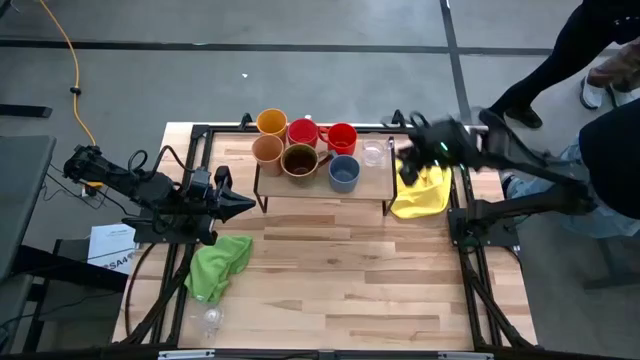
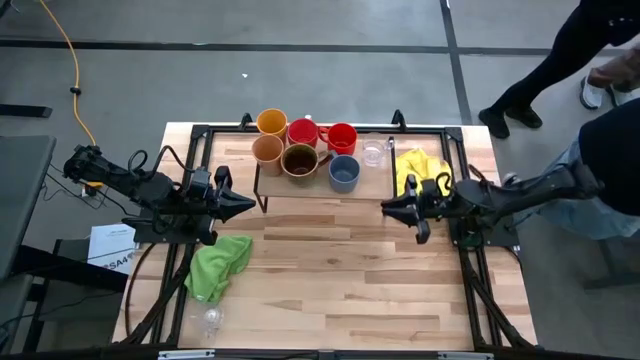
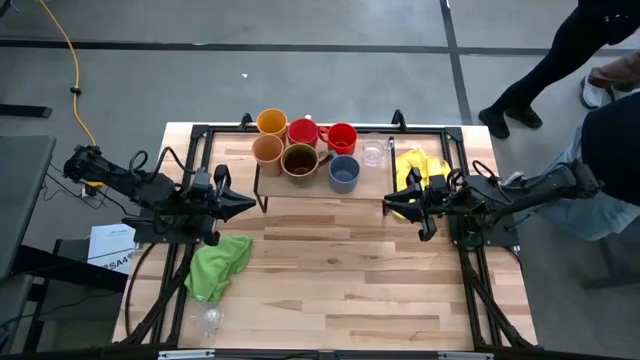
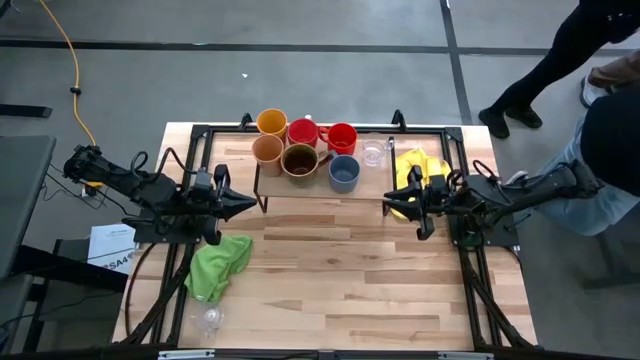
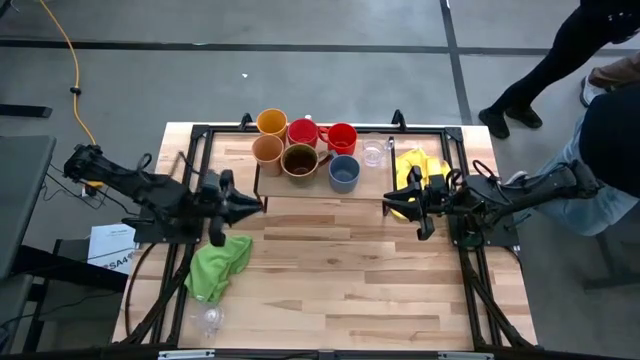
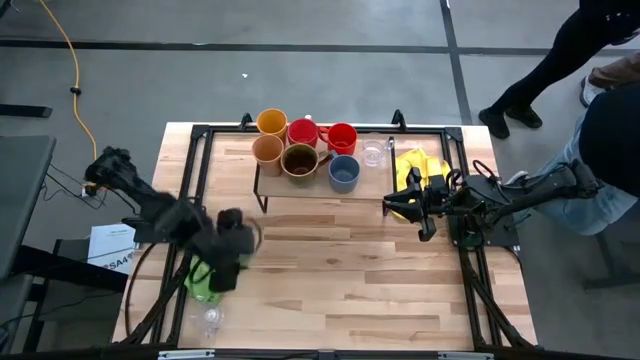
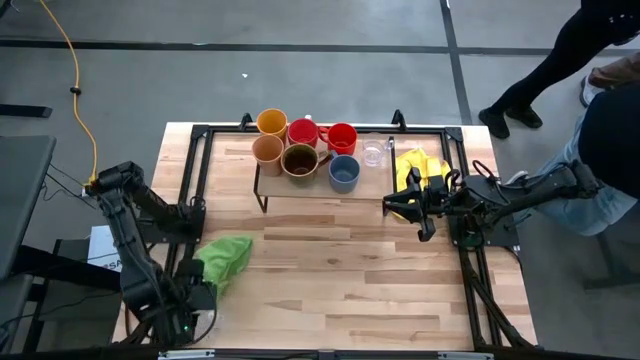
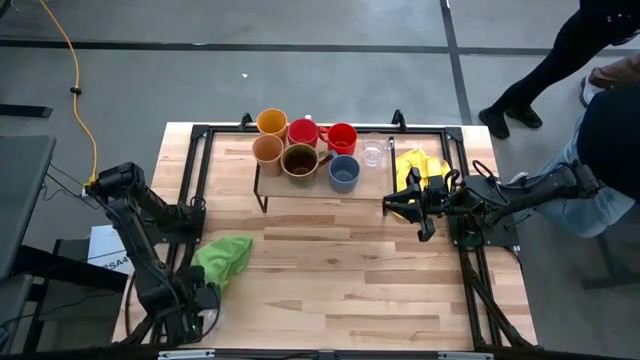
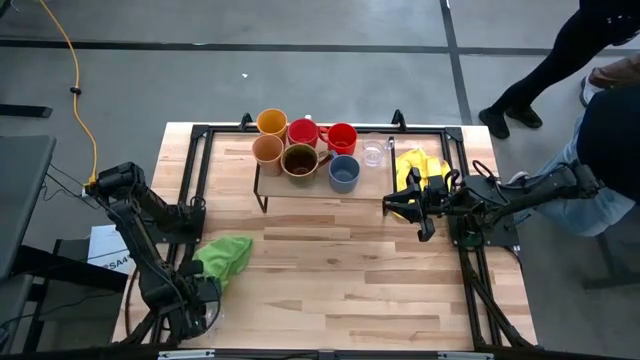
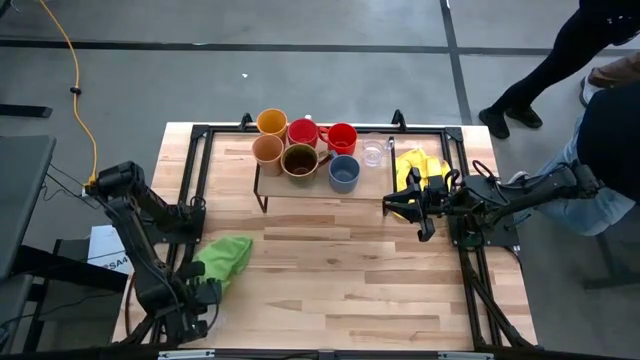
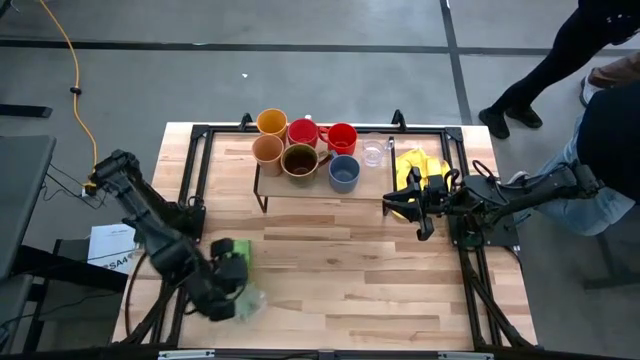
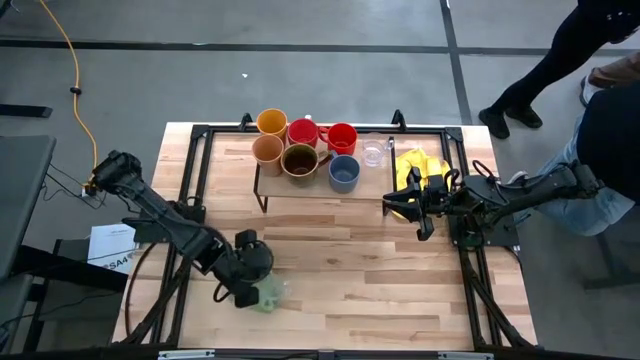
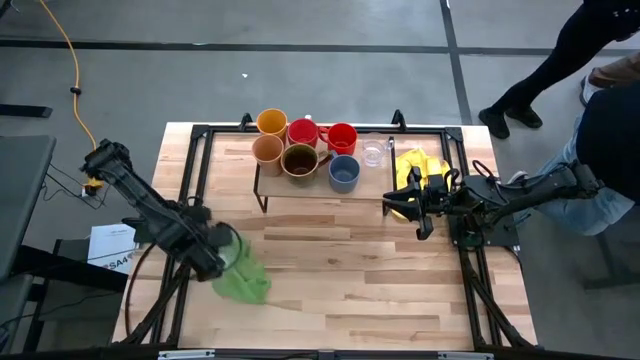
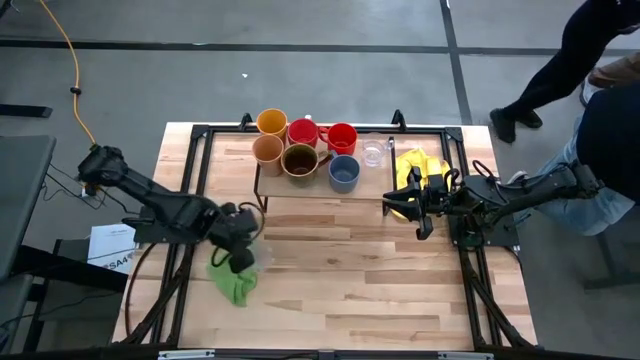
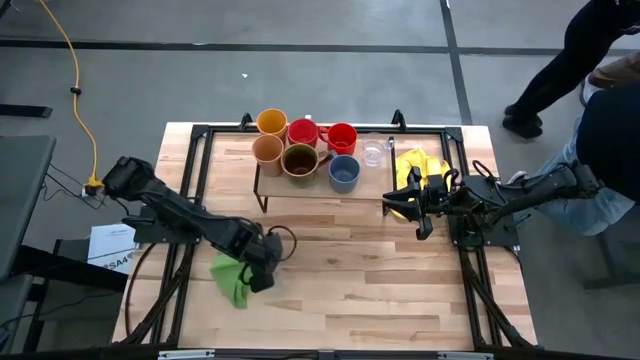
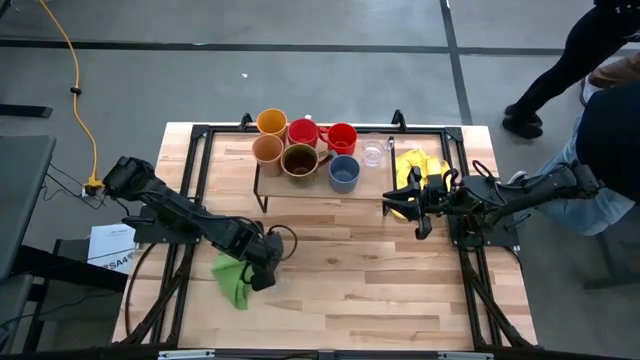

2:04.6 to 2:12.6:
Task: Stack small to large cups/mugs on shelf
Put the transparent mug on the shelf

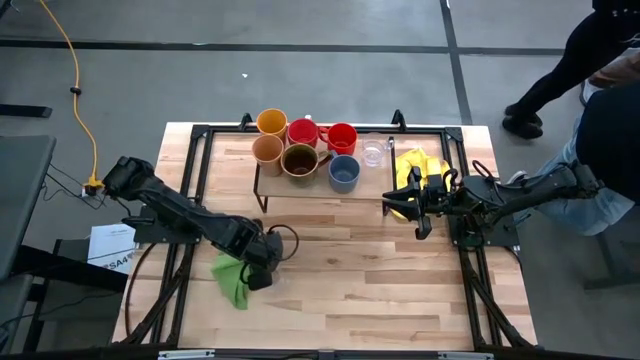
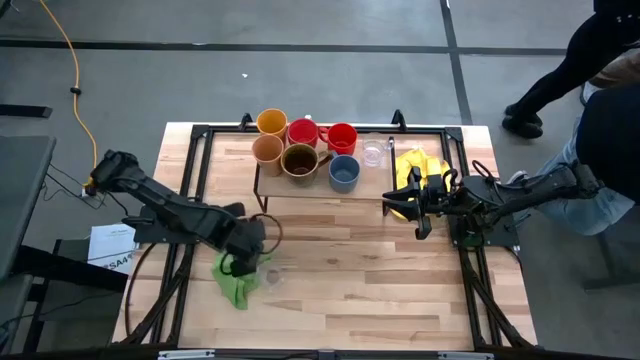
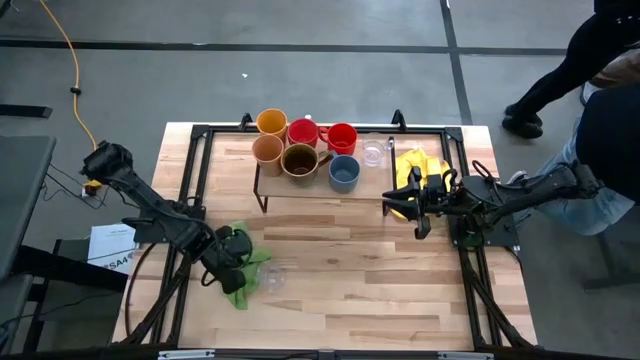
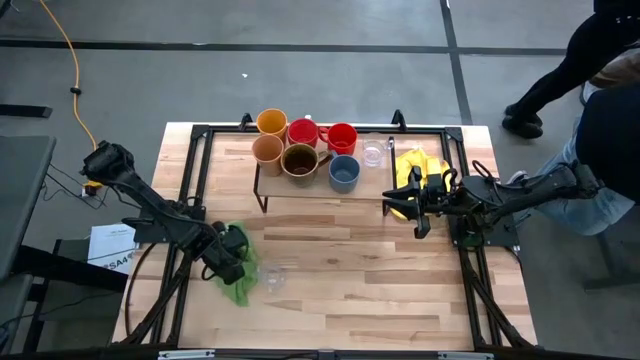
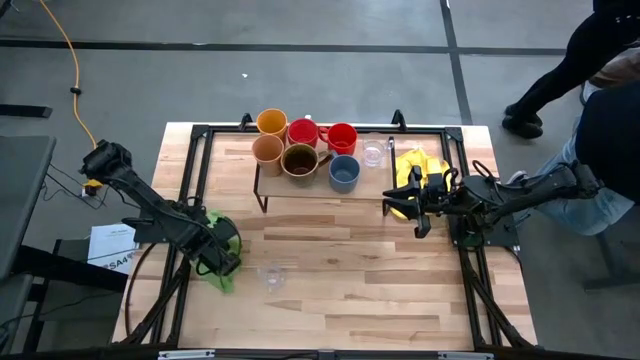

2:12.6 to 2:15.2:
Move the green towel to the left of the table

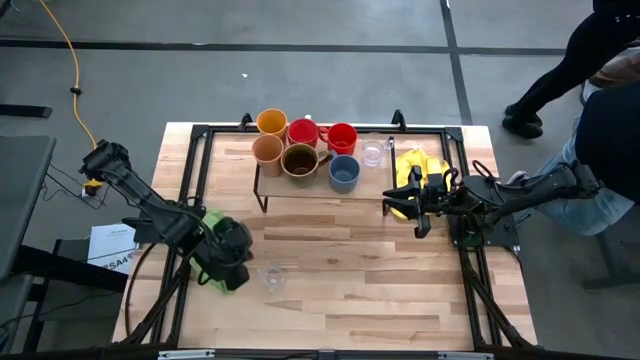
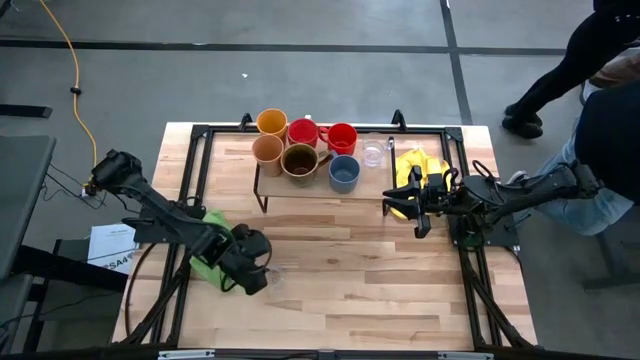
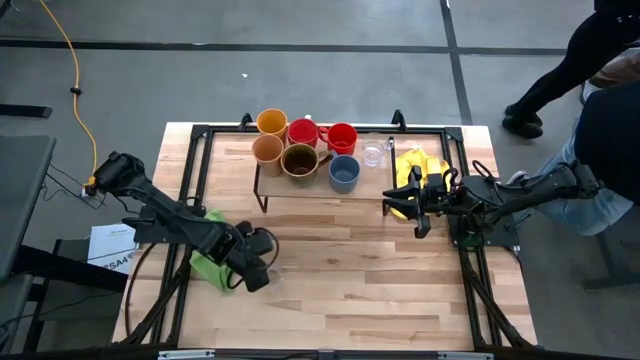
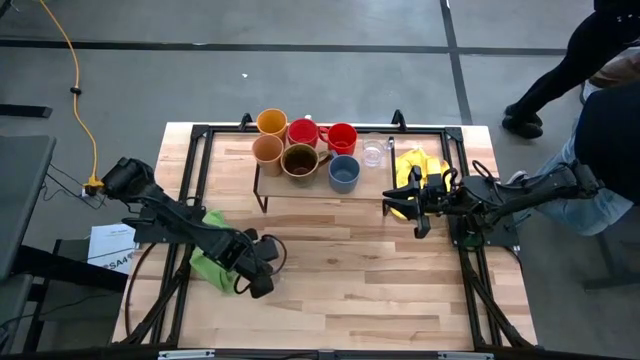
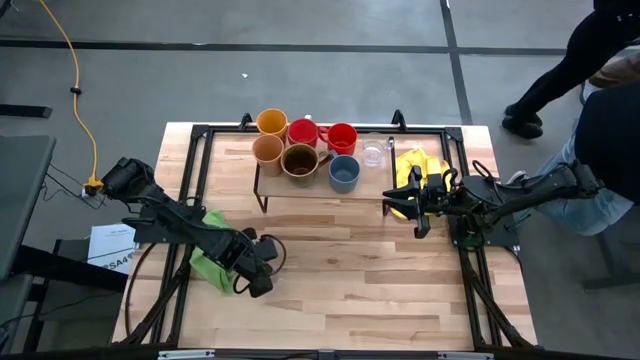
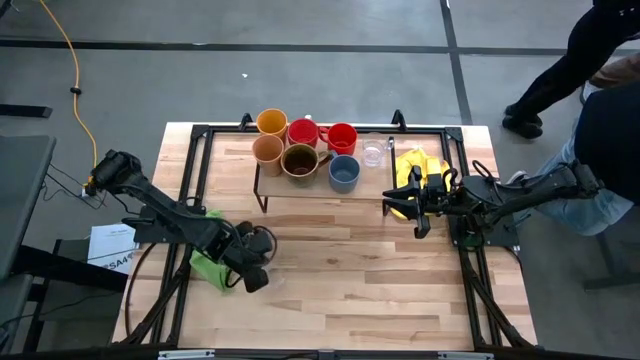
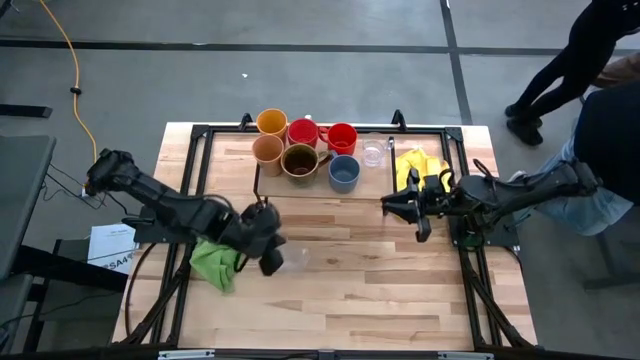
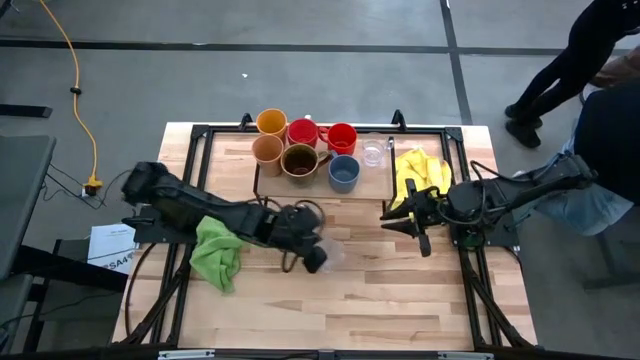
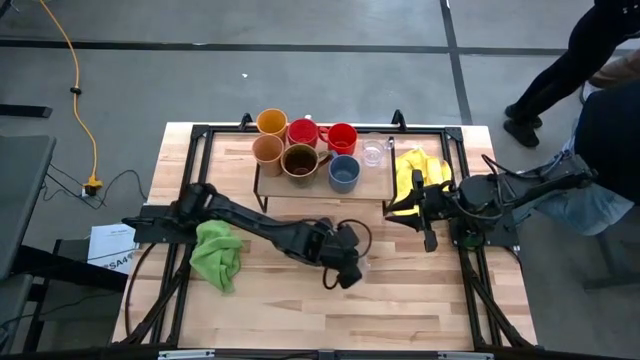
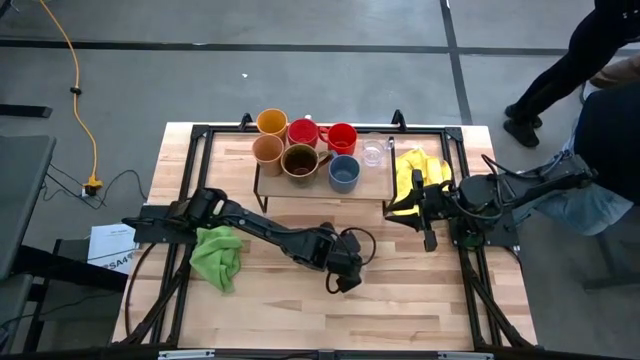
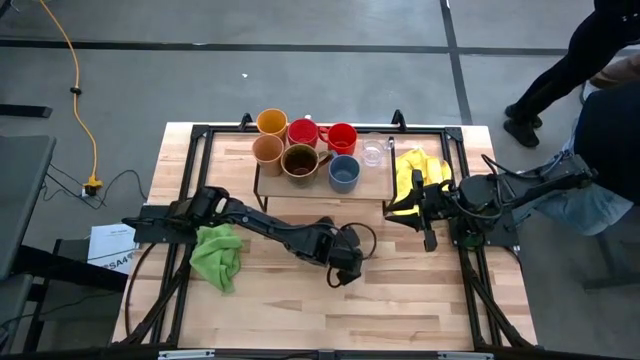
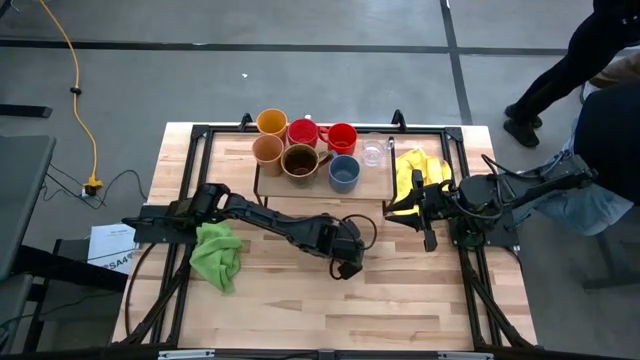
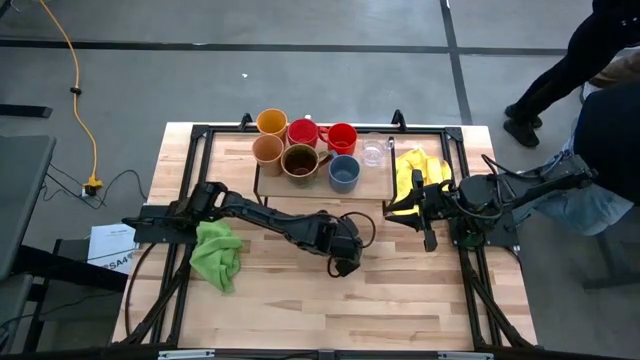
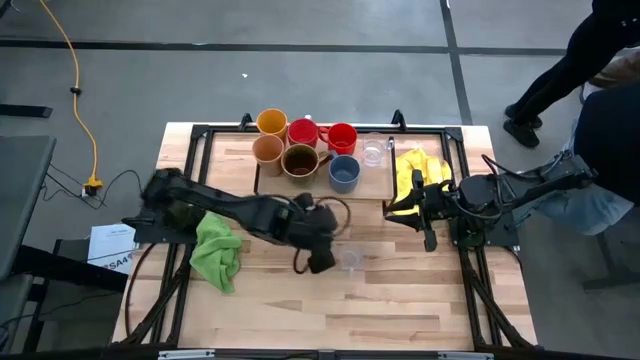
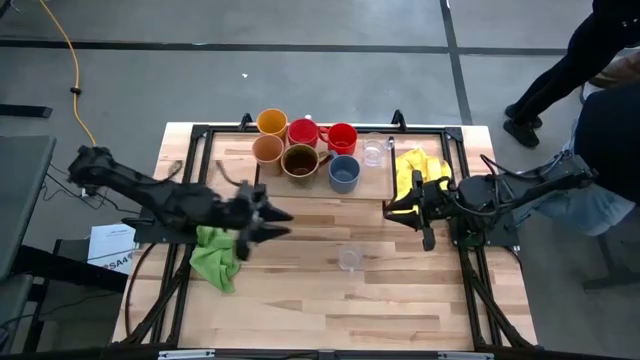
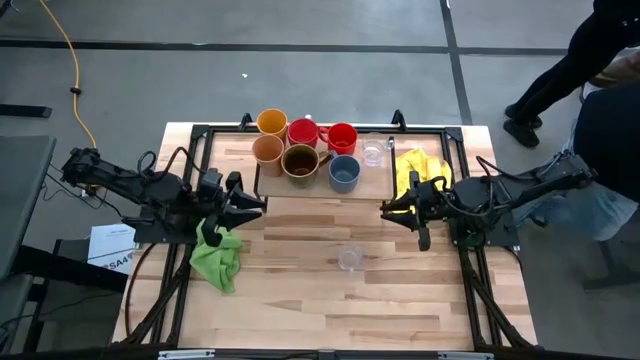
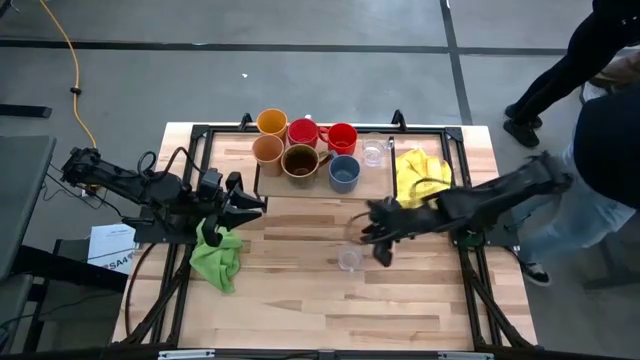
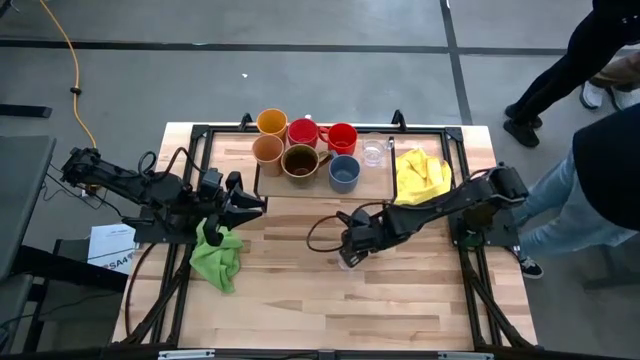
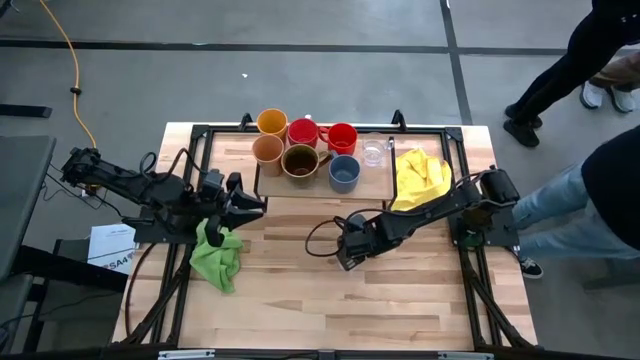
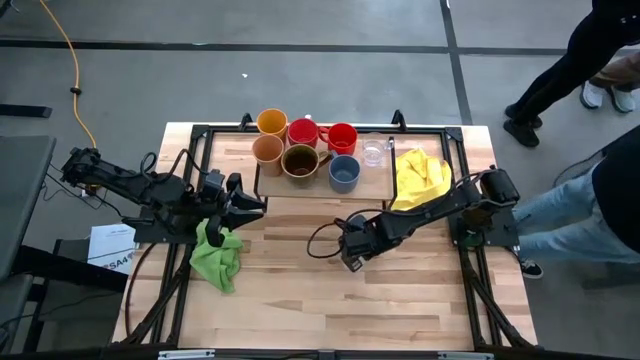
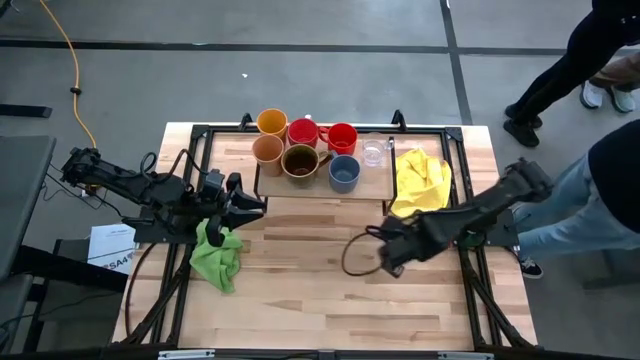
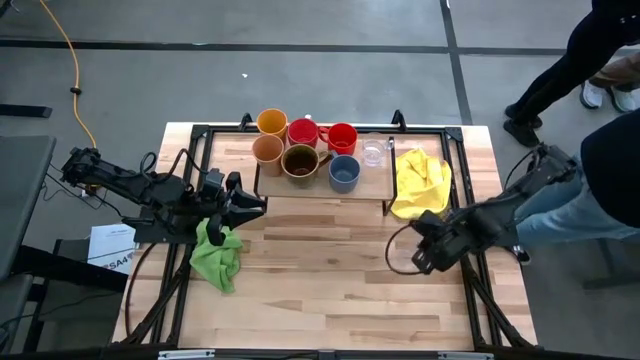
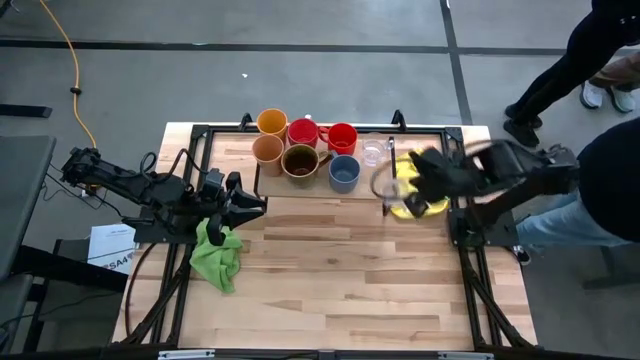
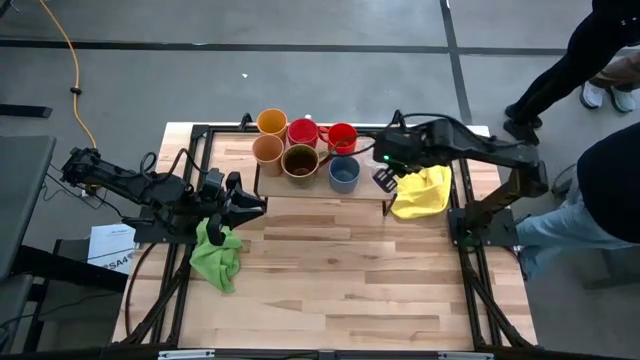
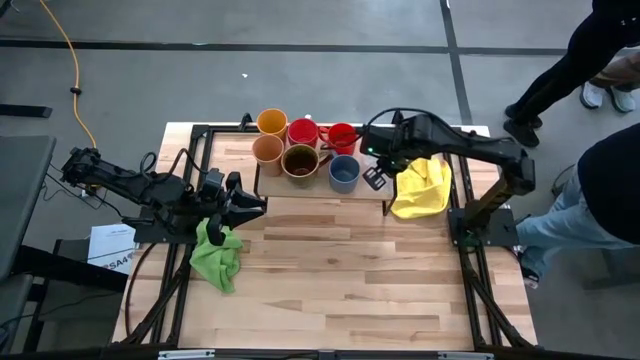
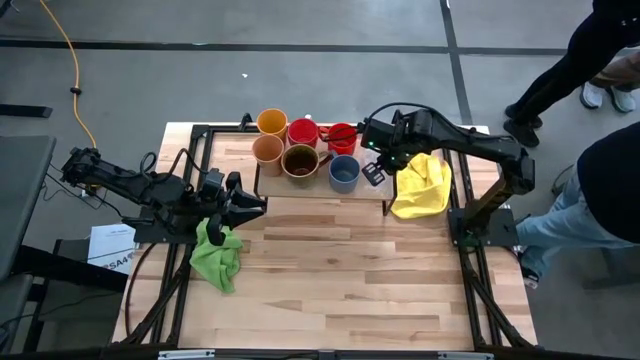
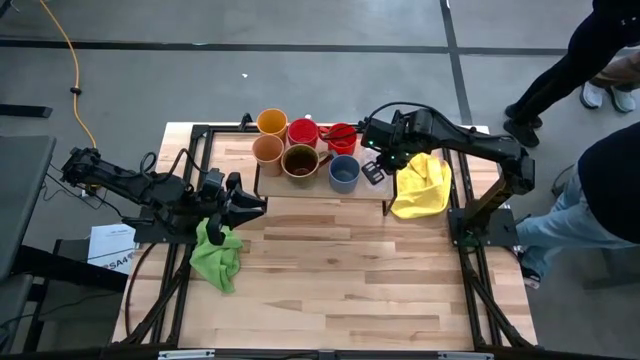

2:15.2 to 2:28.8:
Put the transparent mug on the shelf
